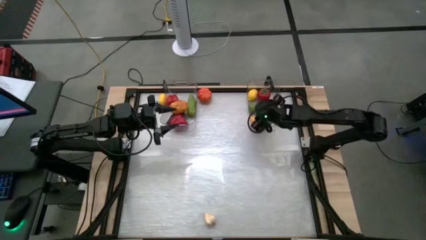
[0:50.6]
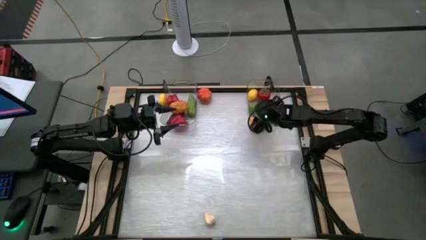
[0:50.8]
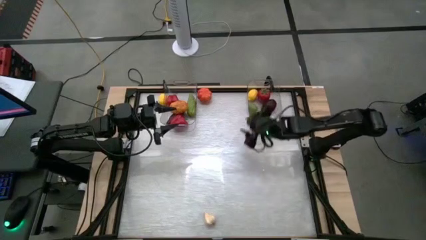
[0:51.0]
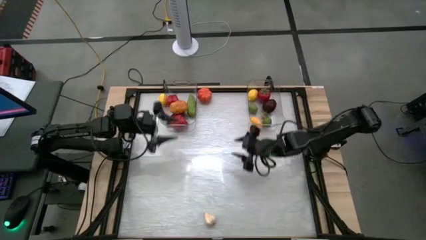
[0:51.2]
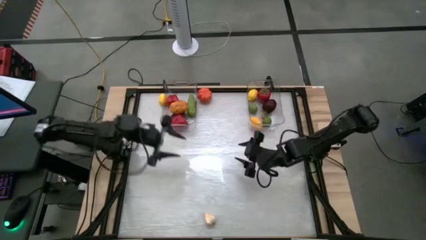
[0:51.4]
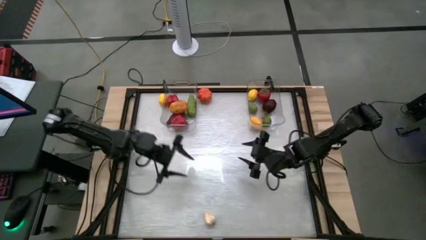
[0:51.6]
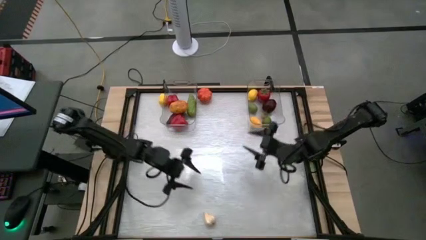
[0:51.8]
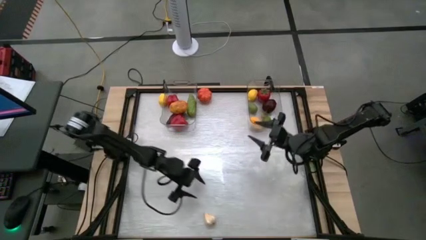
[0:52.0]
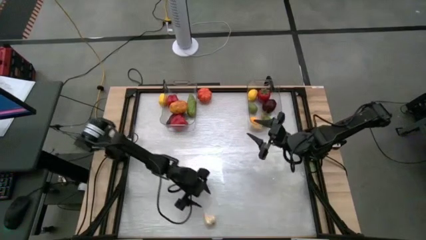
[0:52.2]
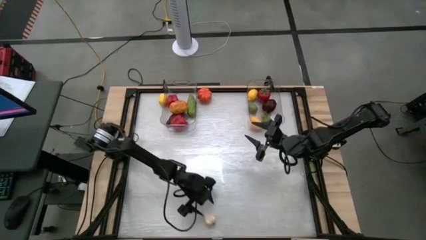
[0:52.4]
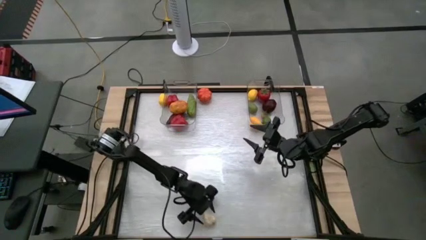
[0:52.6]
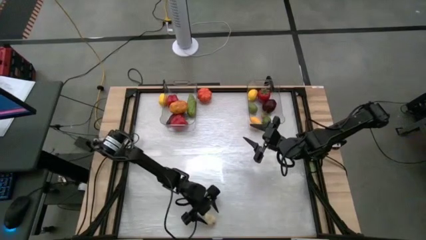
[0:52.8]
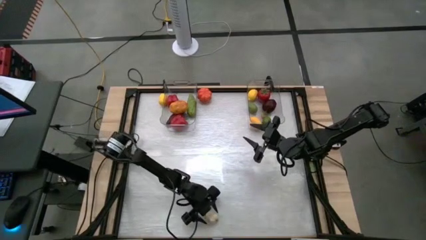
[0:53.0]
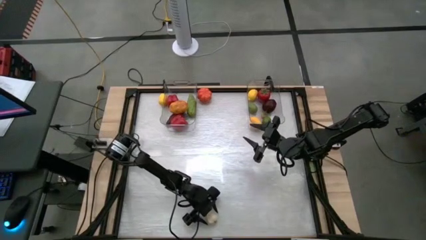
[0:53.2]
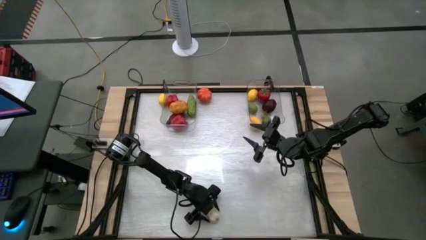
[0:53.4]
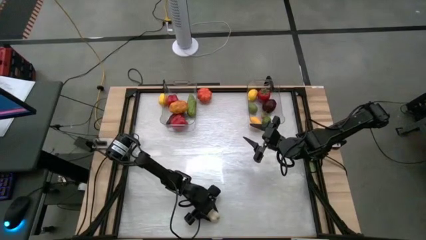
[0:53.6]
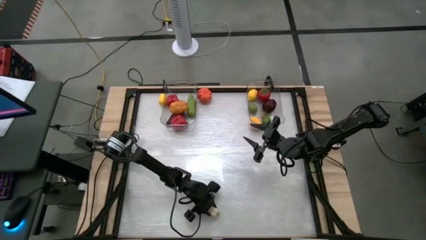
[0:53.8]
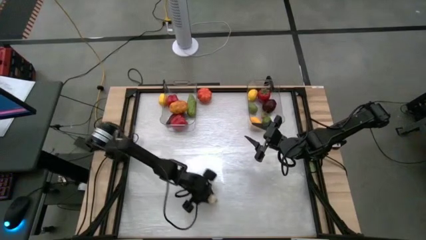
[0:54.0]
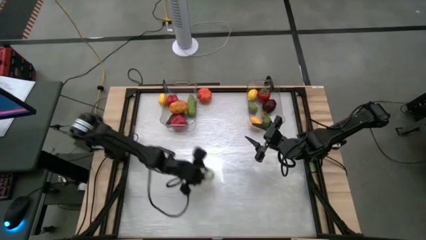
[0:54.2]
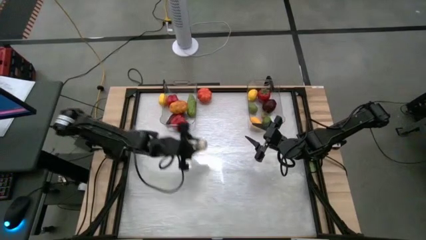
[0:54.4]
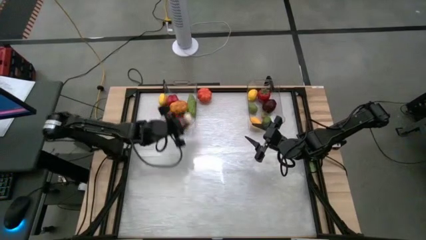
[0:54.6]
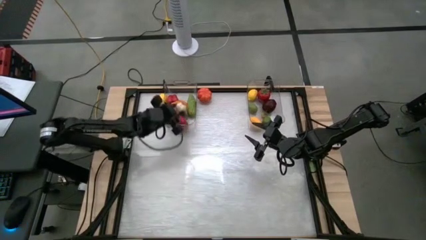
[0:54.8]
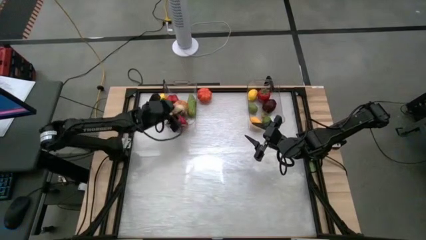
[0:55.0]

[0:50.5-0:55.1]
Task: Sort produce into baskets
Put the garlic into the left transparent bin

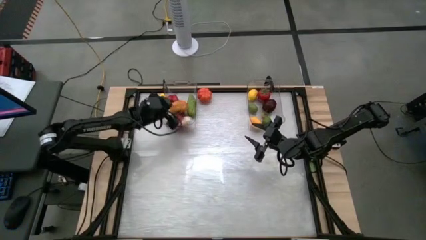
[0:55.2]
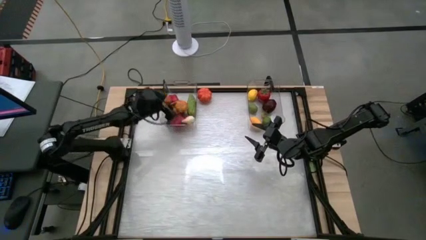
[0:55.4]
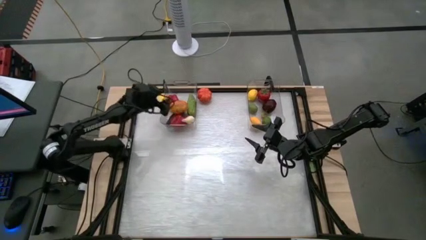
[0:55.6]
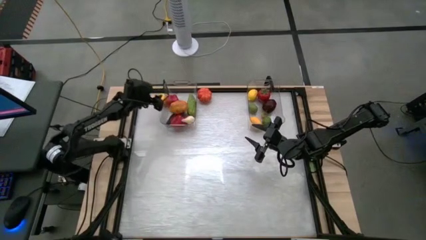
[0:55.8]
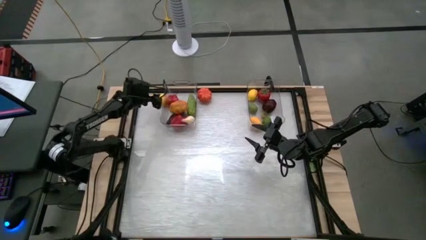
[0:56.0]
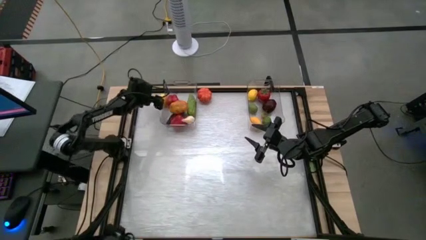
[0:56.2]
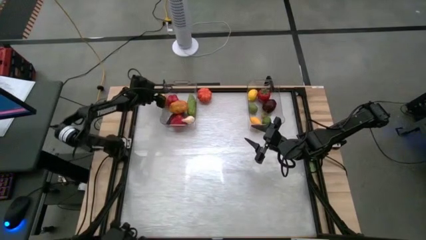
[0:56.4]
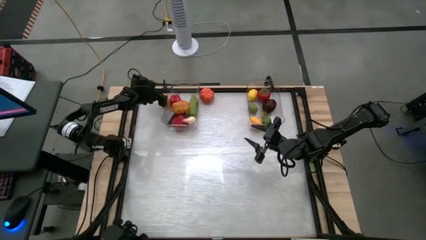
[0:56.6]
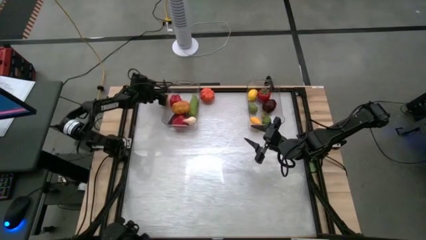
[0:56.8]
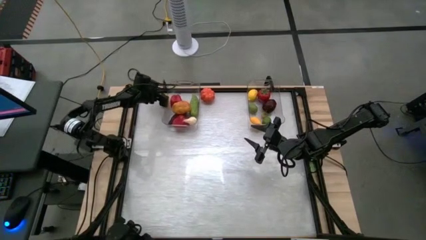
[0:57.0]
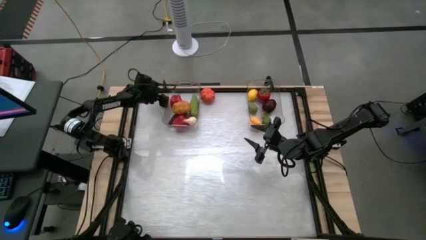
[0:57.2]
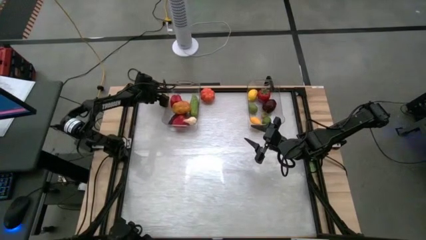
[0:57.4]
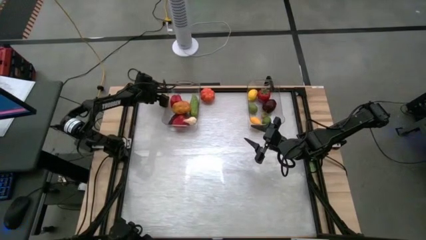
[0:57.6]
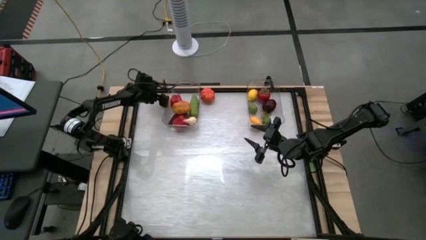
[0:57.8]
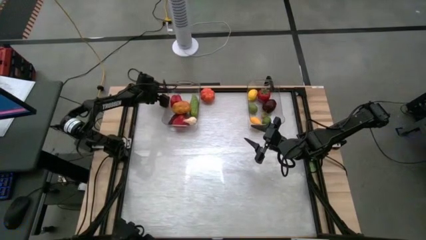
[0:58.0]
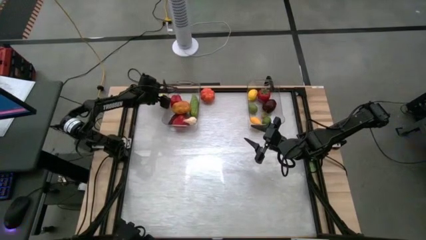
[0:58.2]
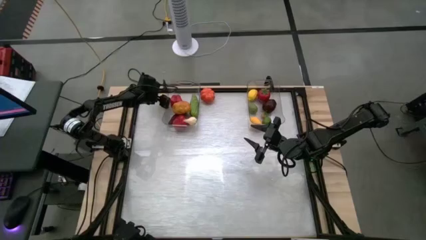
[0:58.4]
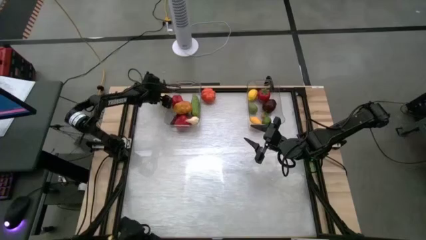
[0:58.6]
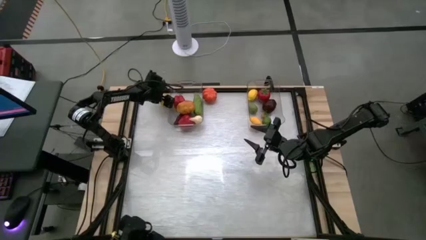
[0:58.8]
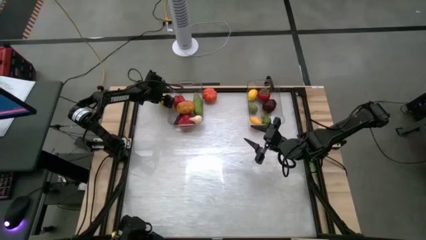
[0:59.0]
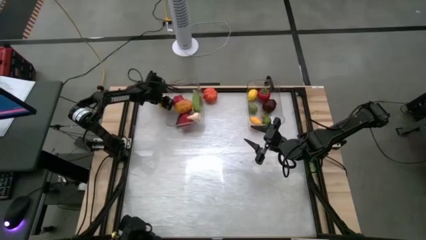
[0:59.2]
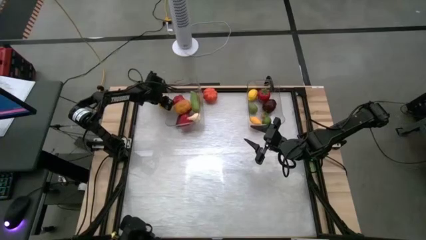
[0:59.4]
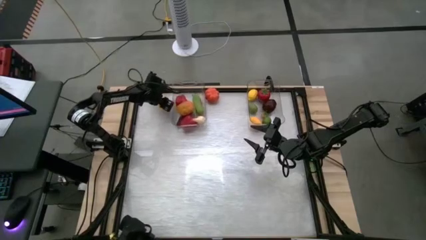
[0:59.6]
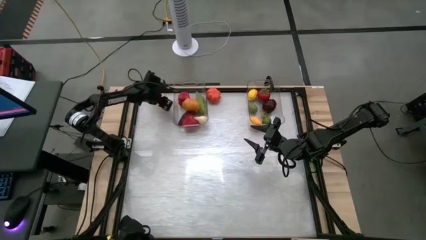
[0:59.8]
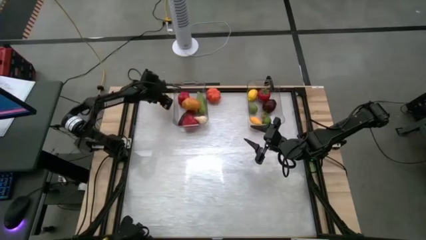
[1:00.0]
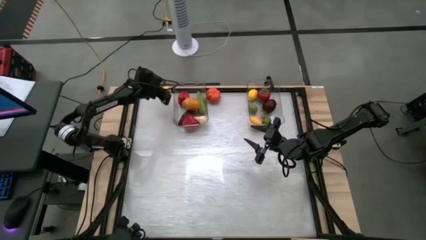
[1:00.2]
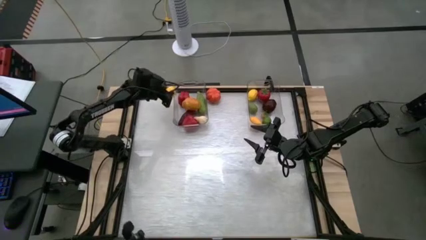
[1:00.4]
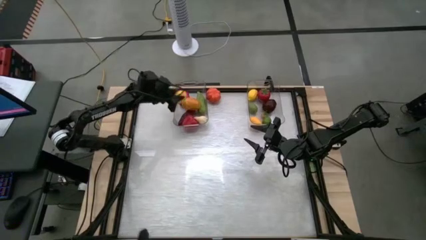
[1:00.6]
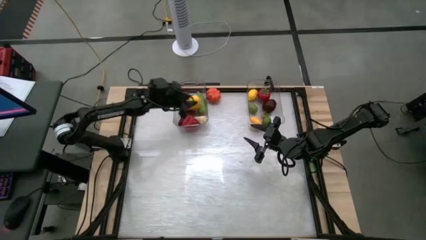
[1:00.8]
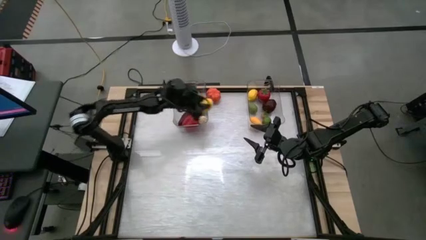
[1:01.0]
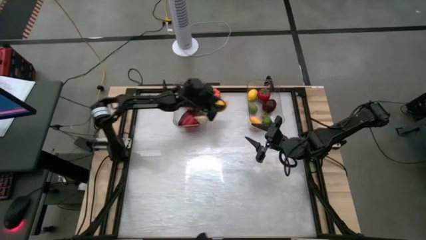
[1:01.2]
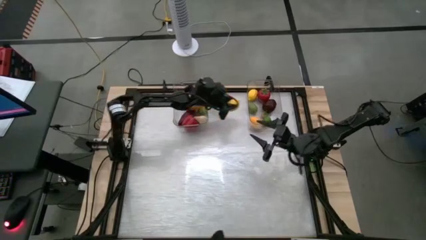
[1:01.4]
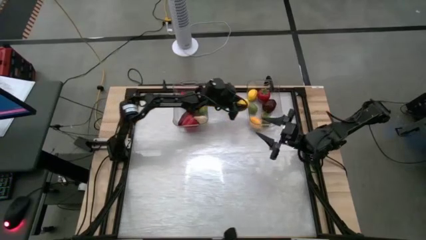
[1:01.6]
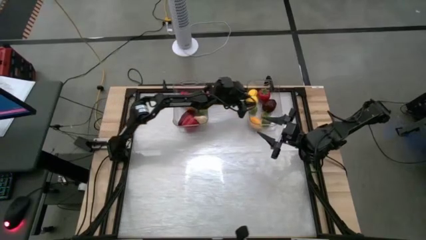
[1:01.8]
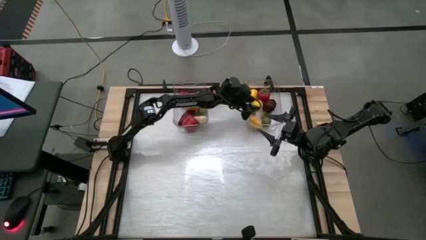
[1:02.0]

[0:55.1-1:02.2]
Put the lemon into the right transparent bin

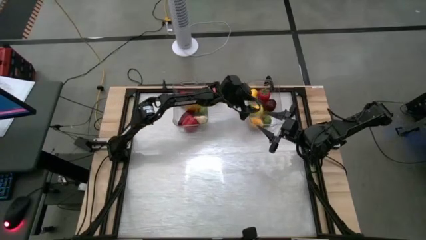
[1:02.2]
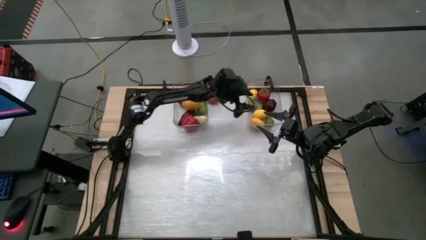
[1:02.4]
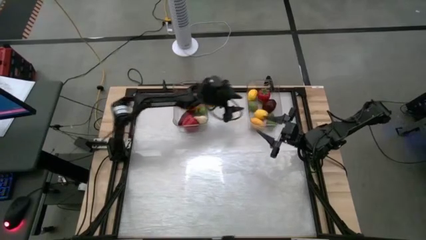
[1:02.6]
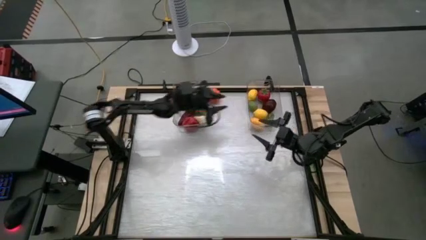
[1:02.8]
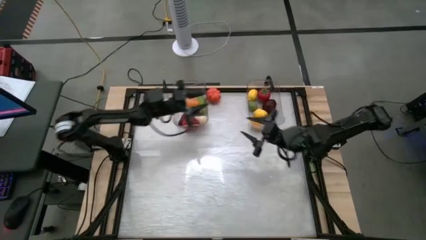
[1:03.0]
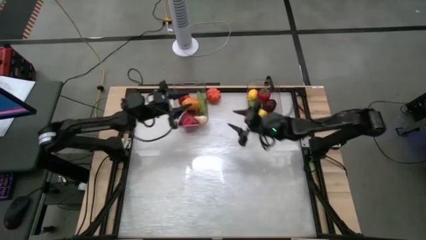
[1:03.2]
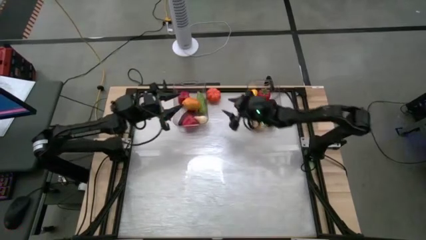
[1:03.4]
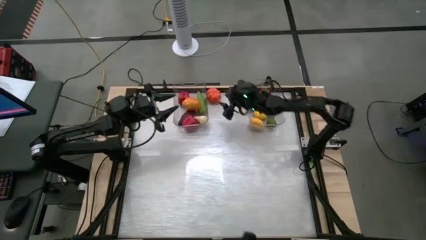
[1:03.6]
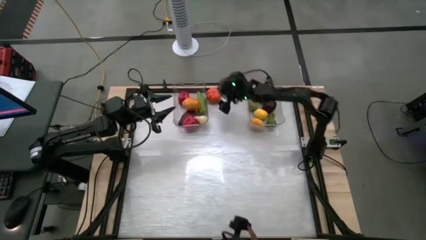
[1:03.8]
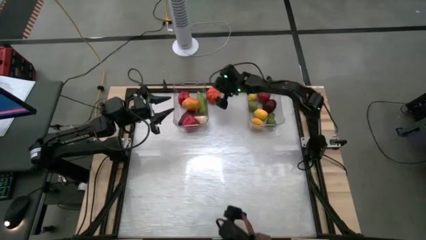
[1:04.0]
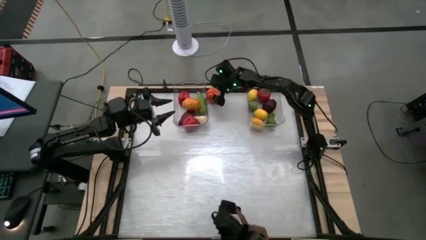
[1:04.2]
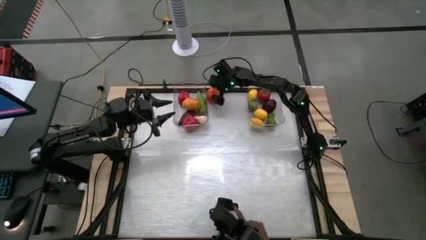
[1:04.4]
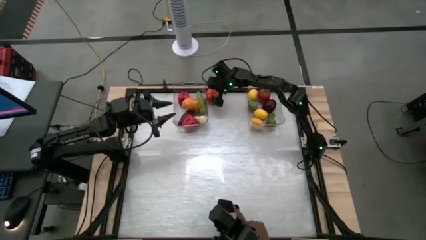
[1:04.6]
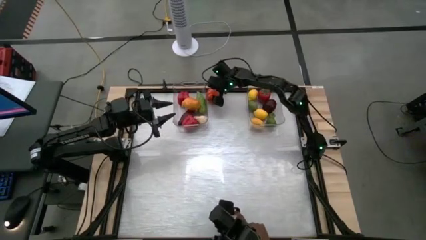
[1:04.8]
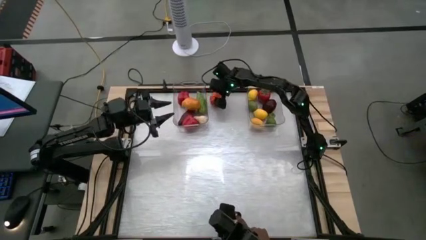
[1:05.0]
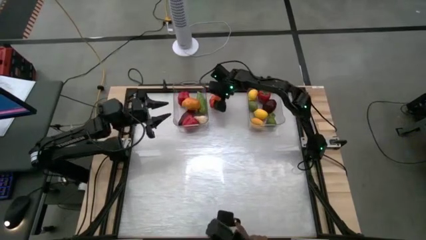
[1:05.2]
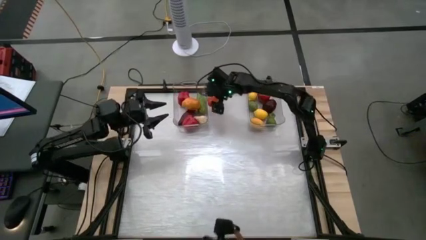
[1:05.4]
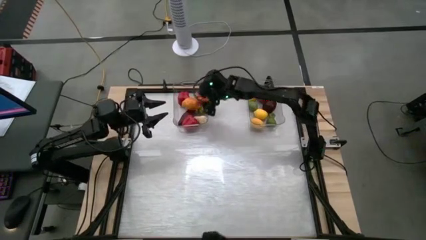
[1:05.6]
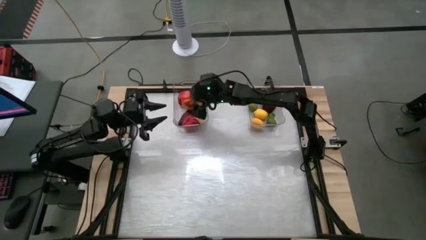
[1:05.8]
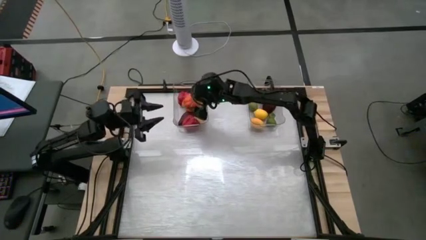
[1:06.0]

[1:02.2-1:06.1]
Put the pumpkin into the left transparent bin

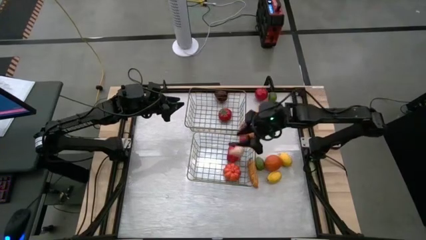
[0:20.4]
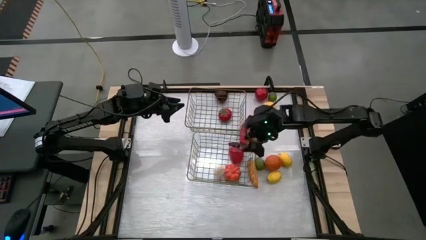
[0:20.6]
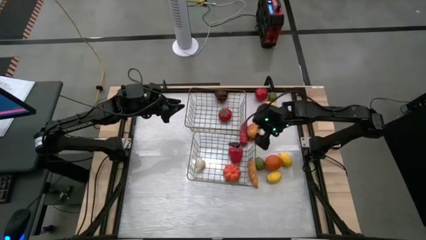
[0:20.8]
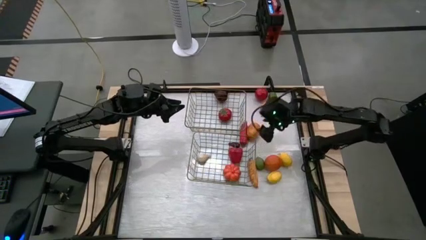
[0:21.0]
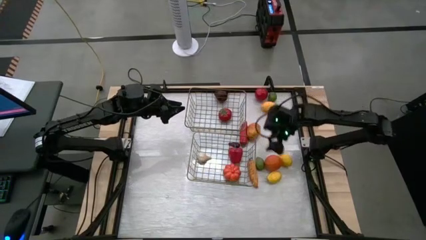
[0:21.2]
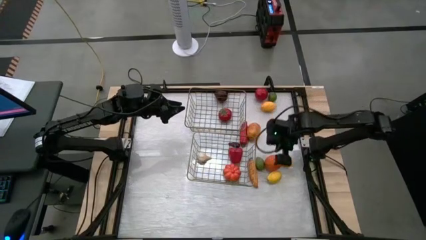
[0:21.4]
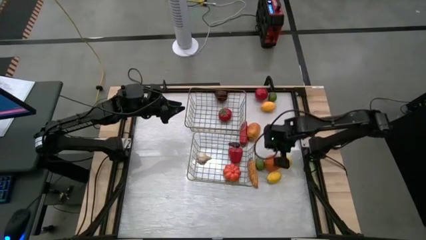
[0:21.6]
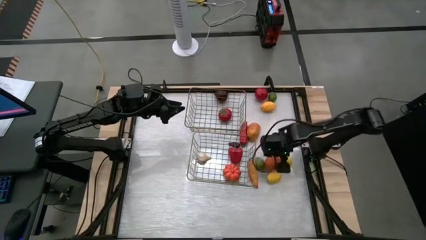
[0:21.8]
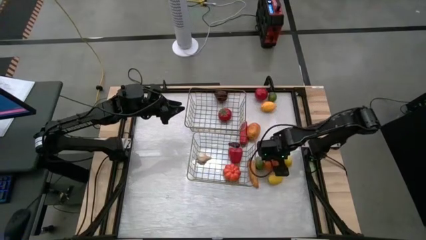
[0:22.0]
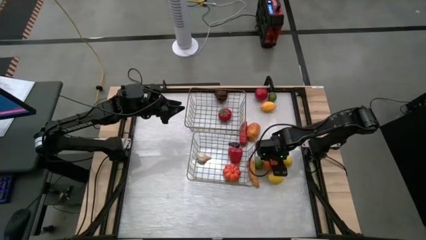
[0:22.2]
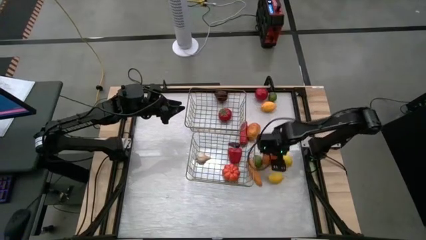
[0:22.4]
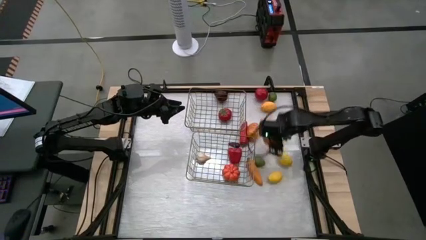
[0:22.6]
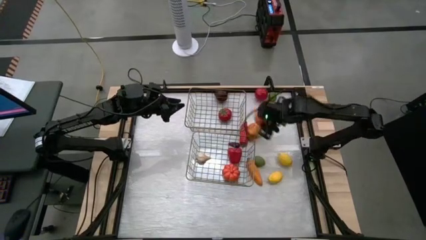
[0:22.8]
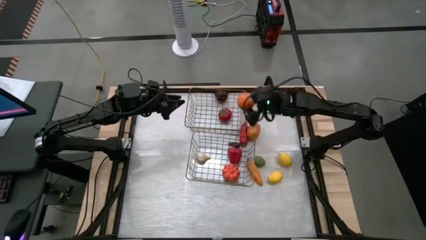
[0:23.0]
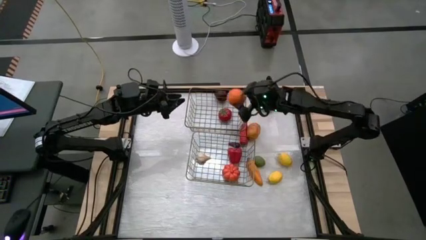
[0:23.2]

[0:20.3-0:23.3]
Task: Sort produce into baskets
Put the orange fruit into the top wire basket
